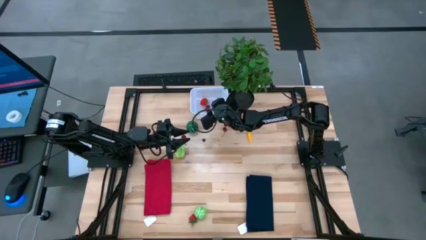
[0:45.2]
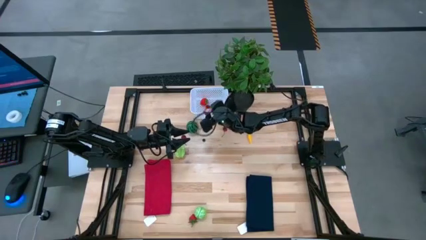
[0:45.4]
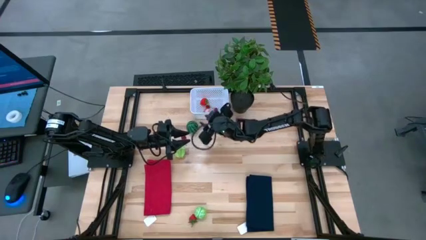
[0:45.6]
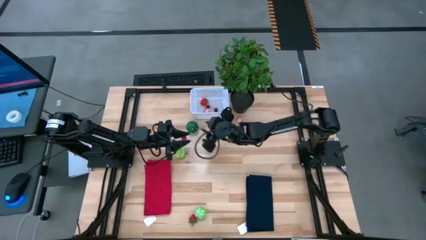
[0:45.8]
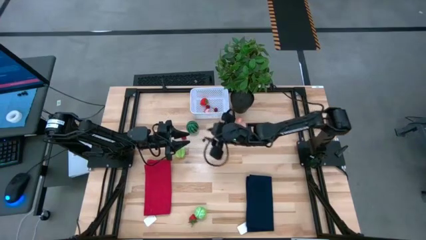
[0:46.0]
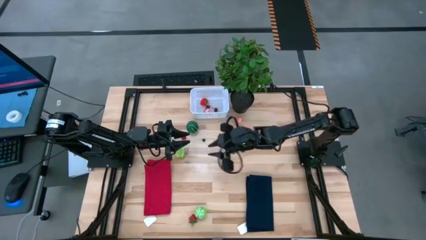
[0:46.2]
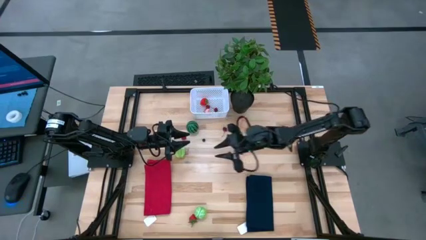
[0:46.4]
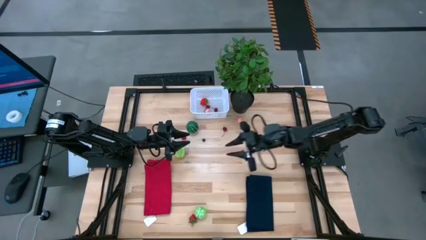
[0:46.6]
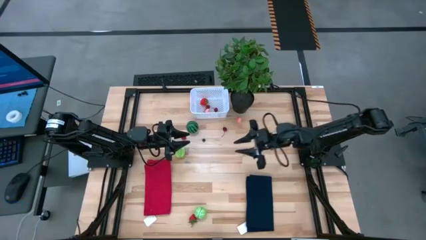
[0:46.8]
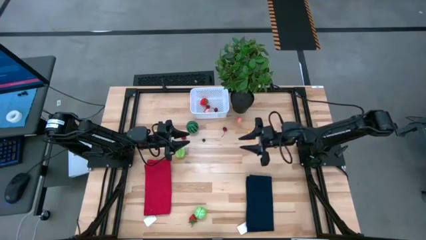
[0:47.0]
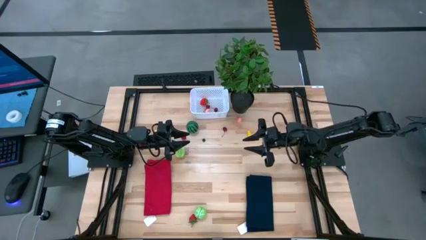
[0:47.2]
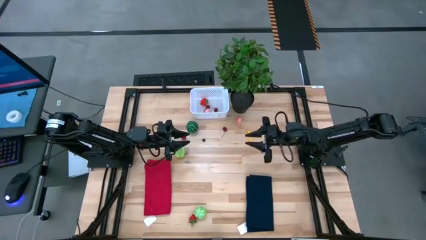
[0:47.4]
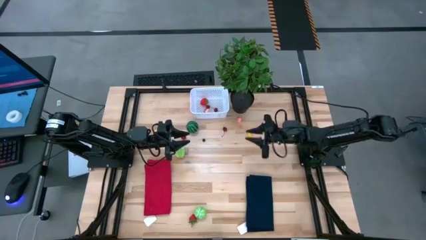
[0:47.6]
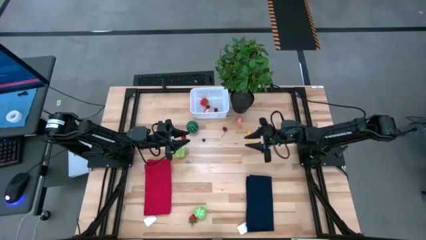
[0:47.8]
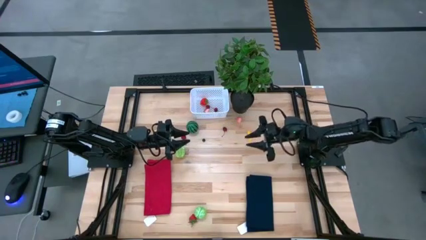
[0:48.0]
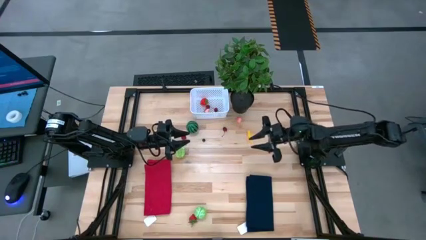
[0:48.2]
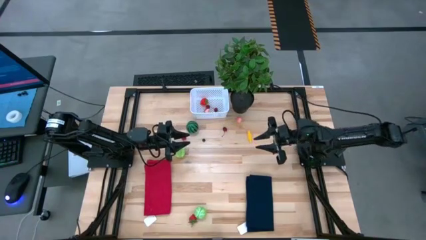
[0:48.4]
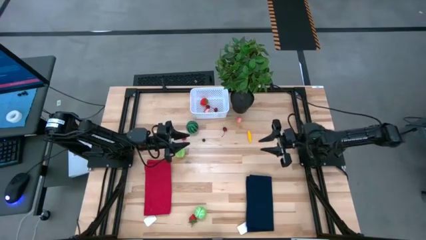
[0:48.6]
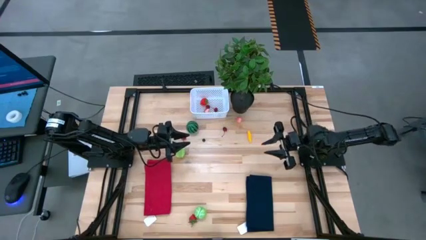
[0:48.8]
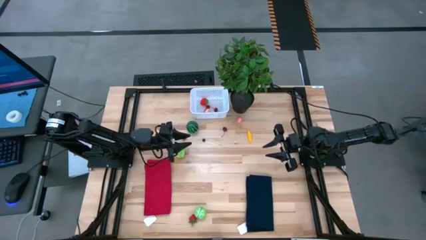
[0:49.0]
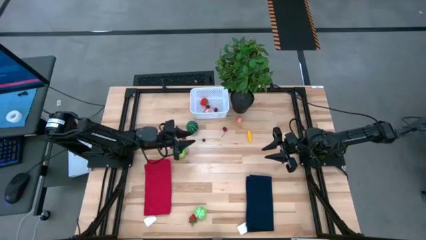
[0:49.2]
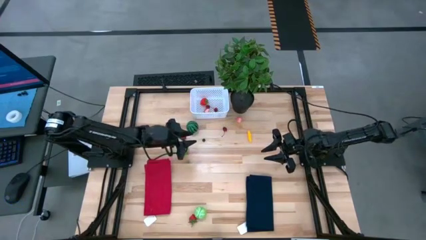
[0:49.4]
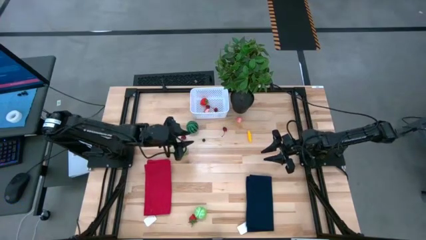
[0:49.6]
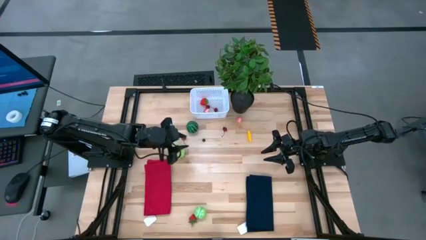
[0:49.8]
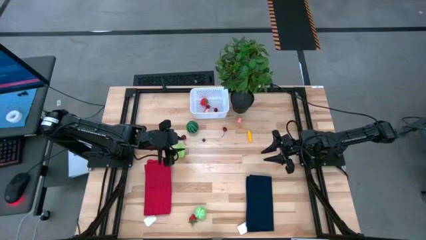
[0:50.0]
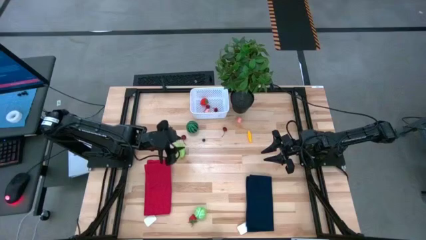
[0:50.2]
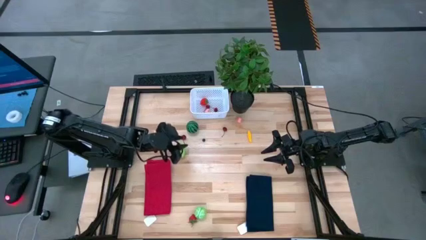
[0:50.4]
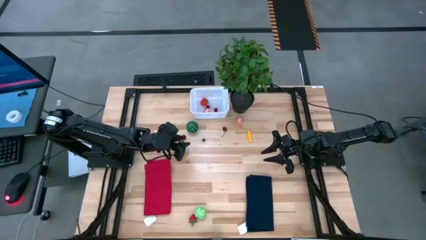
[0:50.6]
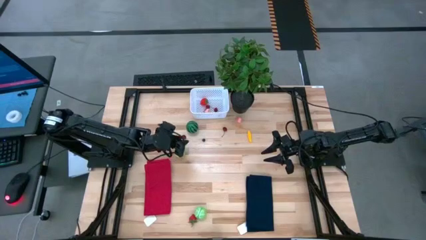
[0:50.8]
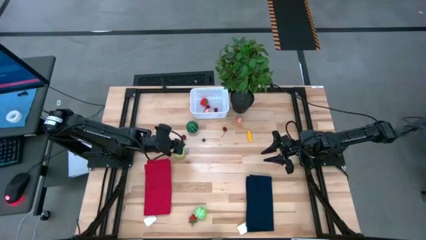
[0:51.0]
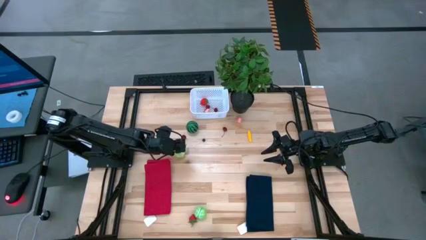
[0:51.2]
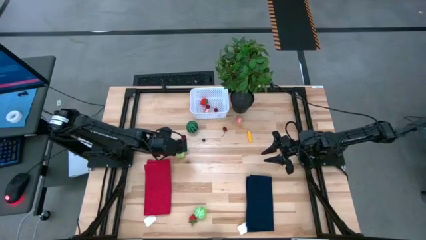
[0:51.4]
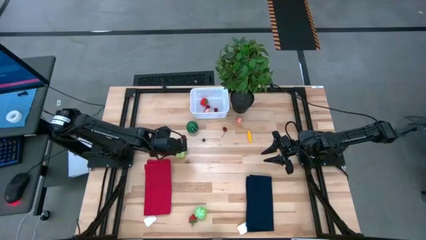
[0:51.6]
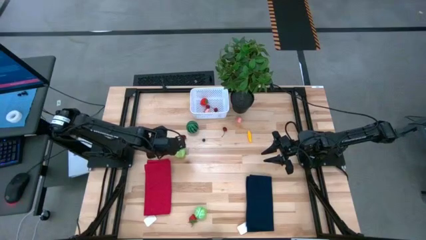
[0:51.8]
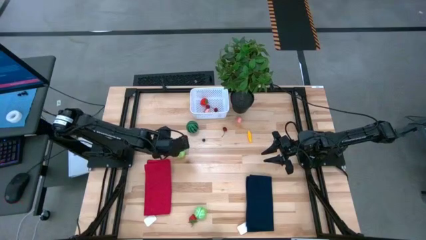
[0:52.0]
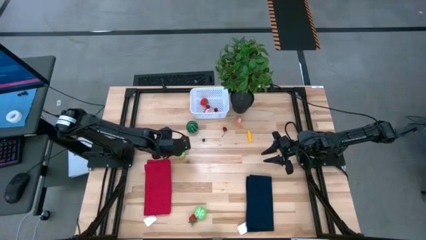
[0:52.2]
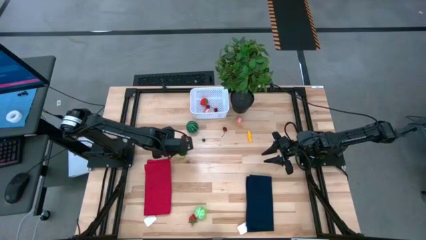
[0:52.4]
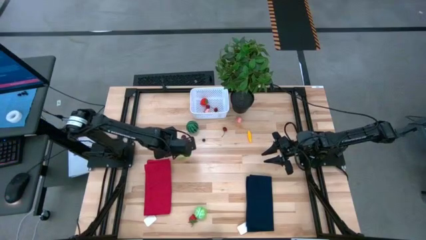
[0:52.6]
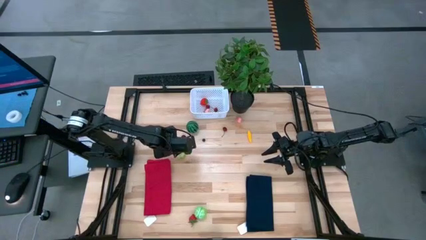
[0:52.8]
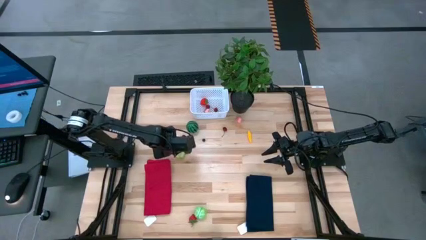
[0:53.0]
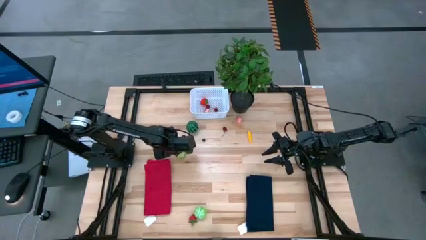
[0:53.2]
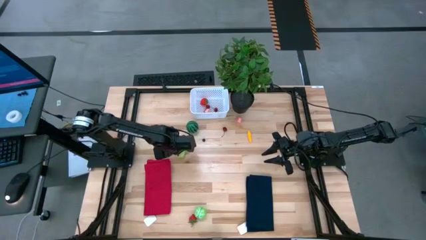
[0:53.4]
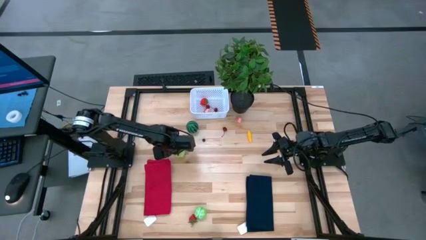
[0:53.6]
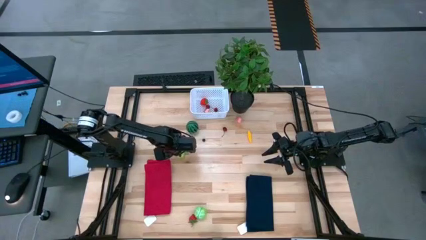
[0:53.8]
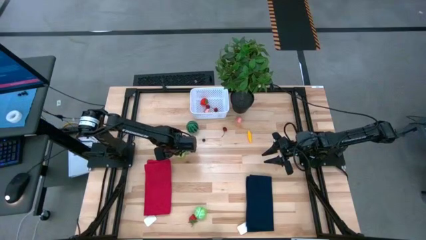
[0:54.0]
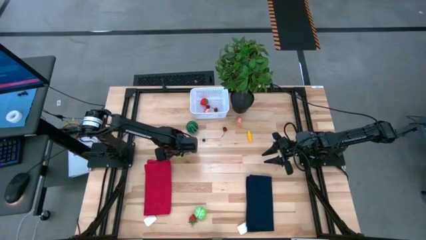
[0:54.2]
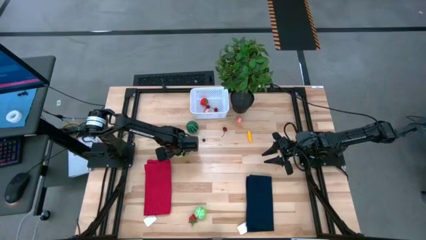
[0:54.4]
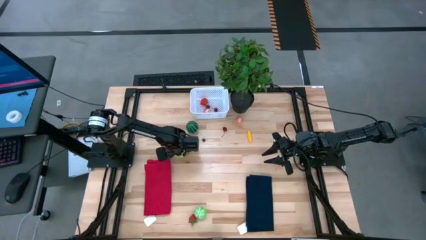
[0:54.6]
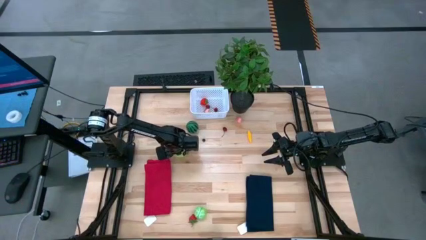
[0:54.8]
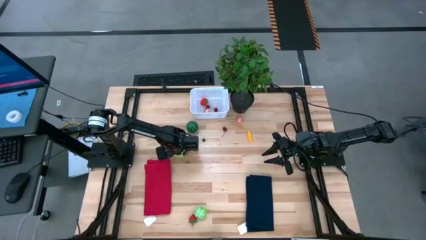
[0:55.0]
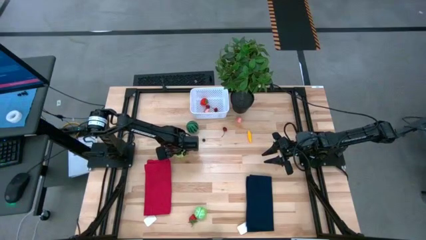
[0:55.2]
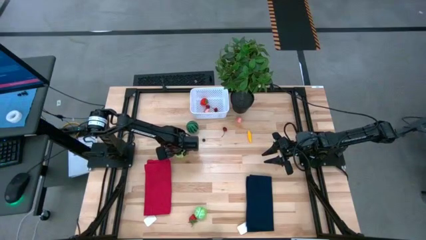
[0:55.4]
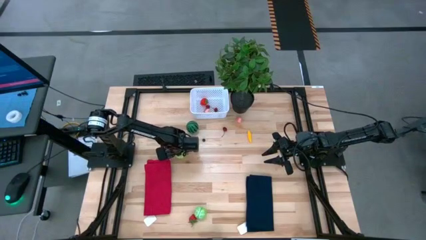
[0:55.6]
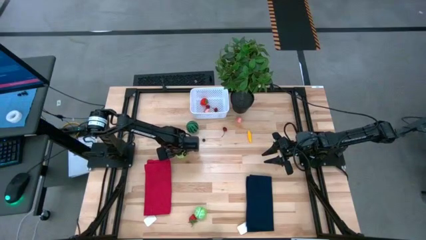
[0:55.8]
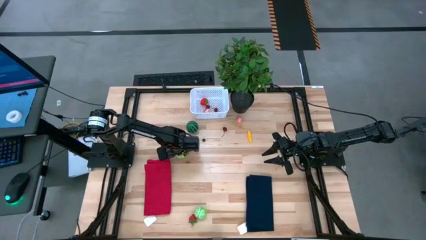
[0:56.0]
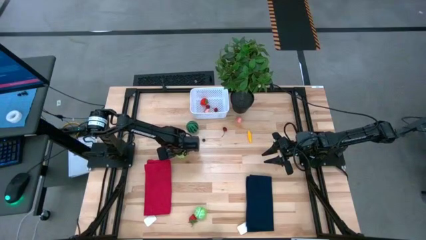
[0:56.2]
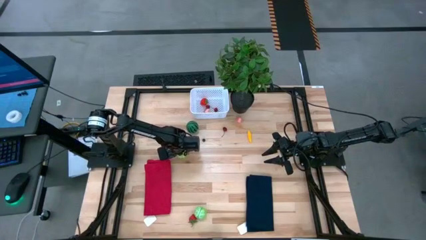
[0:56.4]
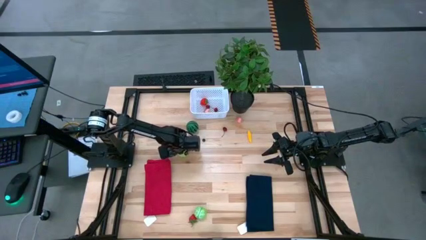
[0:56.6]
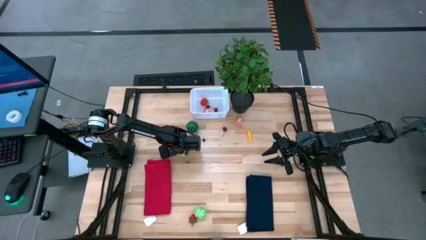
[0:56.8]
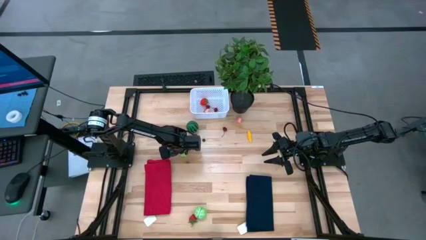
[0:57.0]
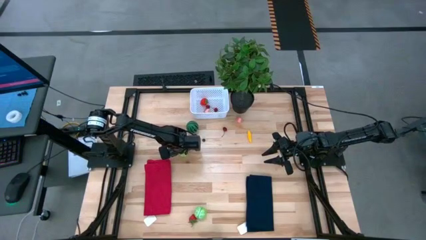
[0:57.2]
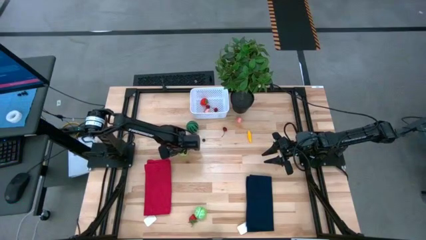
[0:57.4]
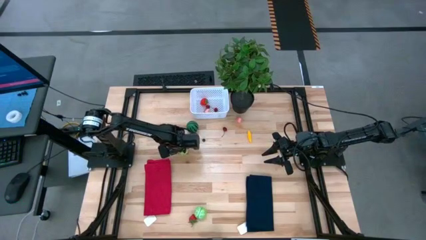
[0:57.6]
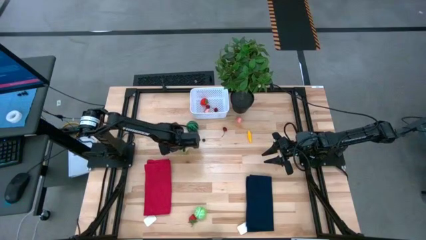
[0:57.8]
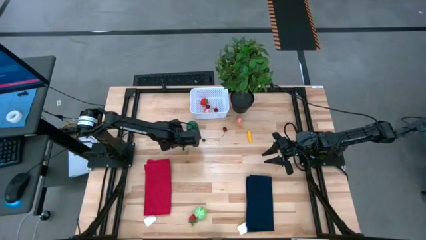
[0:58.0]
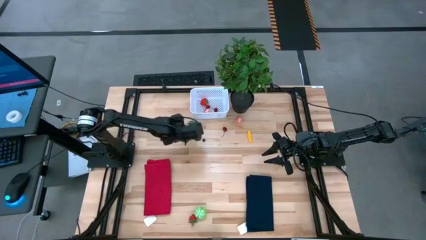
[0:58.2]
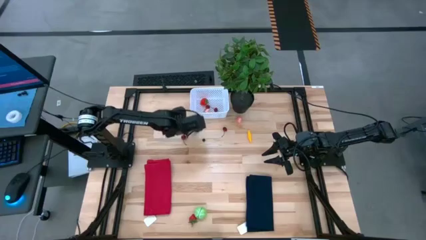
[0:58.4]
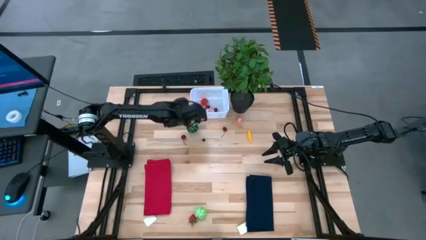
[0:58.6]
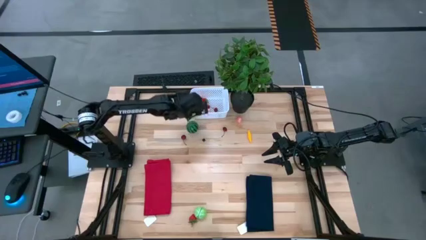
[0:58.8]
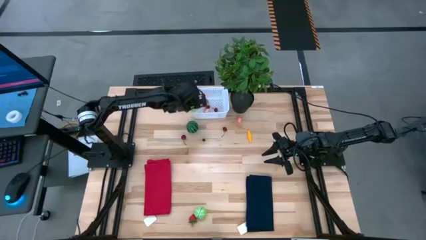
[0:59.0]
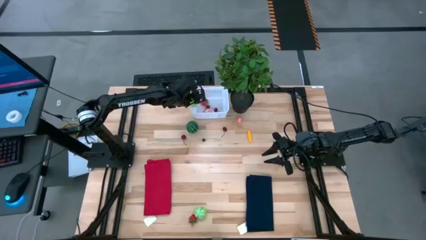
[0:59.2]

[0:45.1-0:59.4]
Task: Pick and placing Produce into tupperware
Put the green starfruit into the white basket

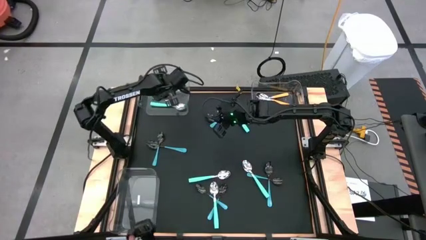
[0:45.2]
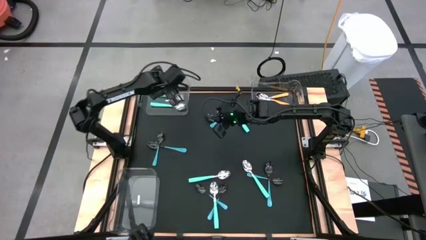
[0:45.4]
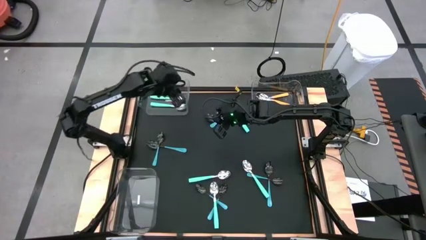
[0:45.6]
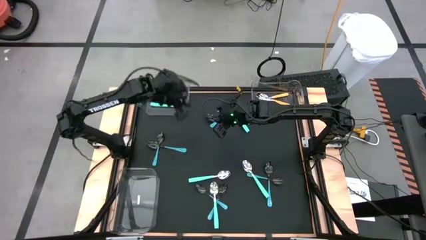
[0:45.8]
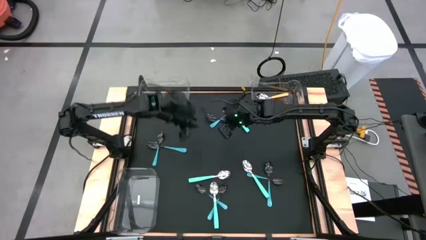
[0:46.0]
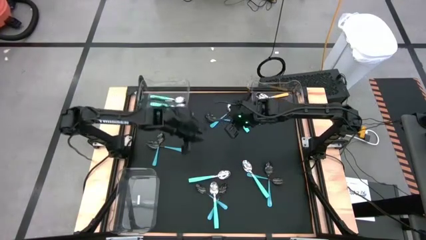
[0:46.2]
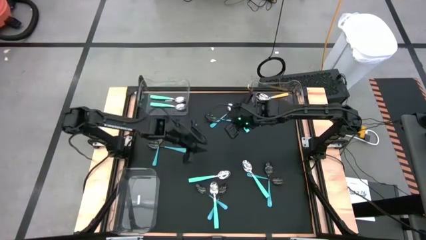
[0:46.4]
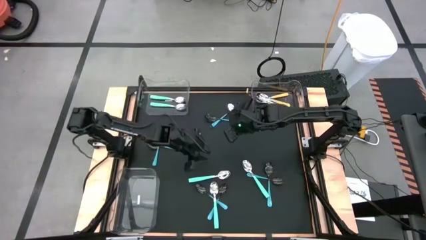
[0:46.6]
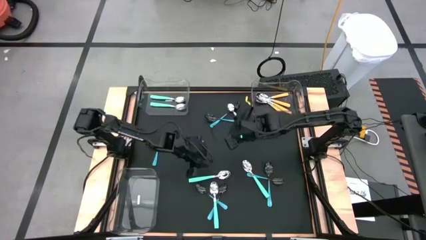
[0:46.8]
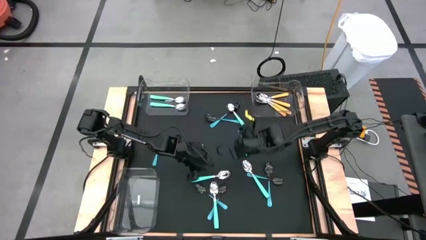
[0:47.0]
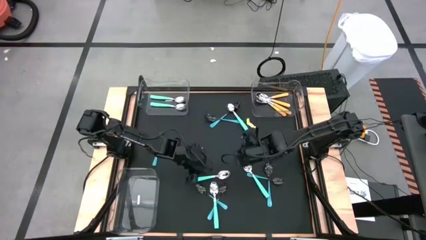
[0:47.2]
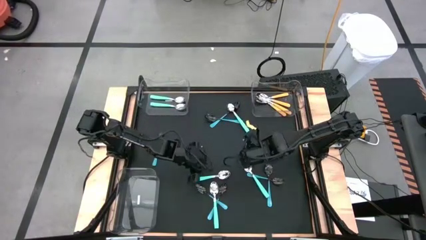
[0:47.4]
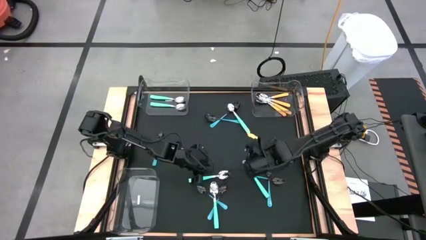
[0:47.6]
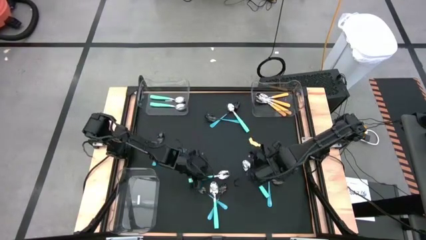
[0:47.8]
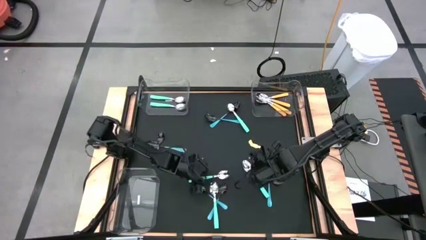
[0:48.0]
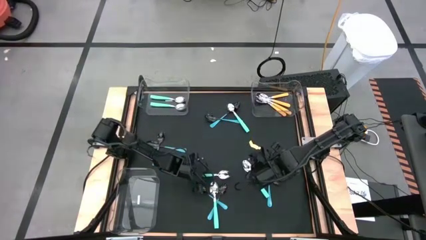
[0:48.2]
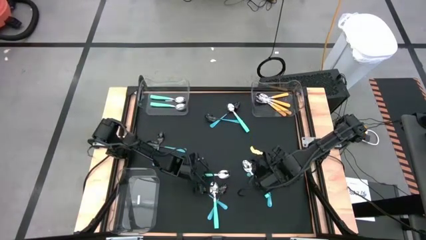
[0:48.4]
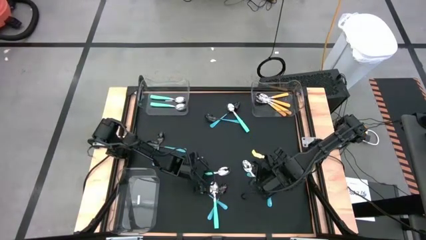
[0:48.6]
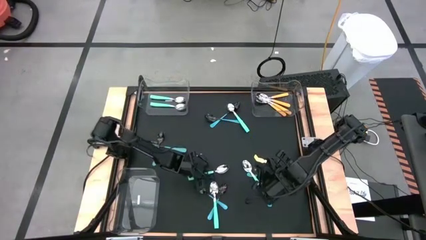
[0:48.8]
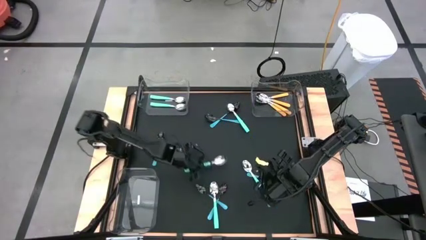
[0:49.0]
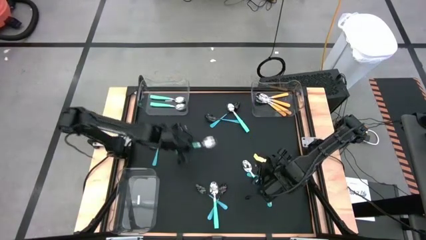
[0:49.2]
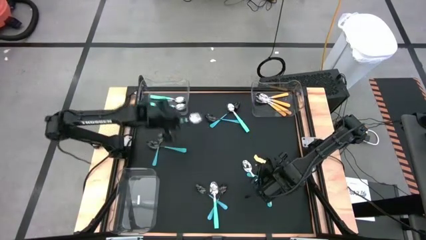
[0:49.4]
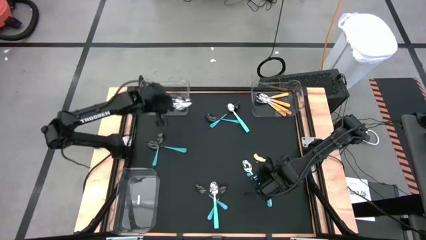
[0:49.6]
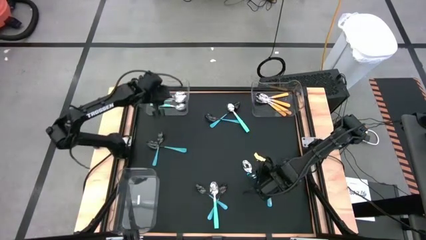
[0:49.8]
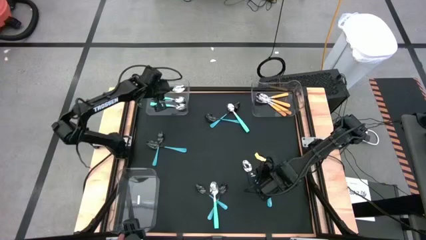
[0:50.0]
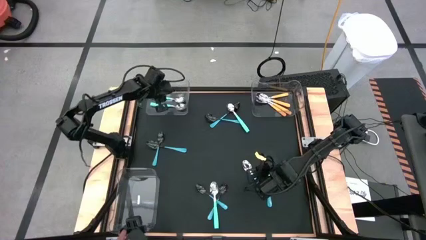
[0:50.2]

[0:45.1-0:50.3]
Task: Sort silverware by color (type)
Put the light blue spoon into the top left transparent bin
